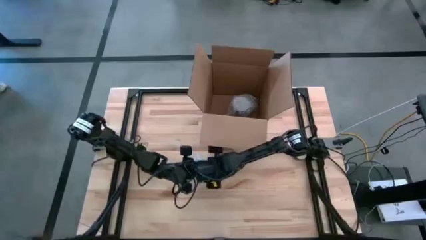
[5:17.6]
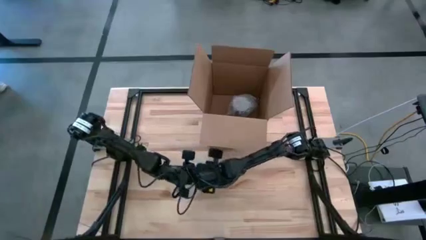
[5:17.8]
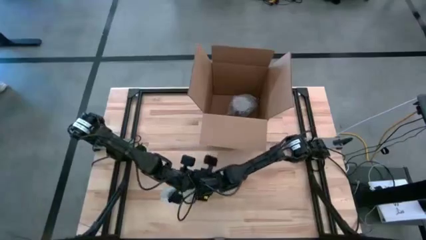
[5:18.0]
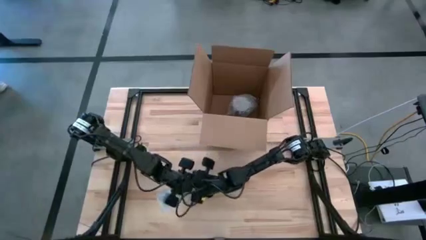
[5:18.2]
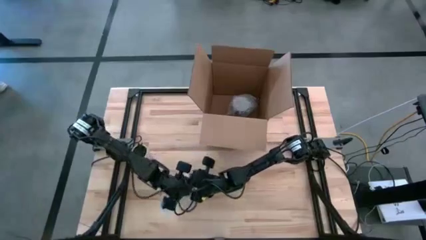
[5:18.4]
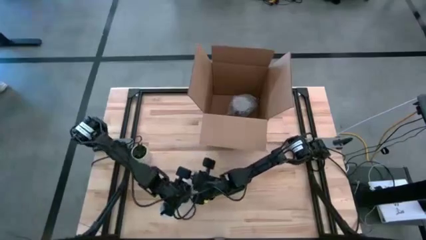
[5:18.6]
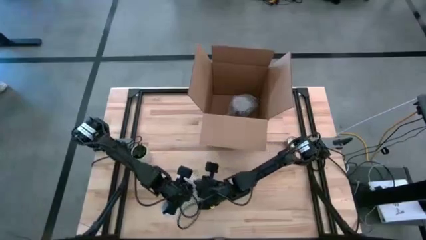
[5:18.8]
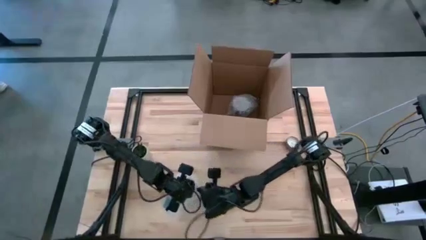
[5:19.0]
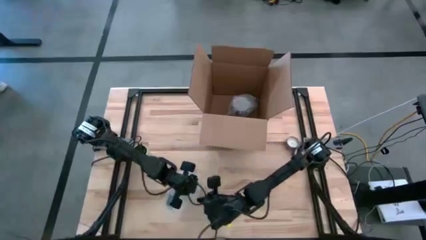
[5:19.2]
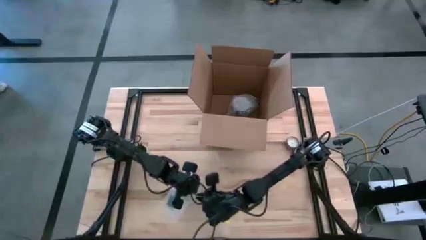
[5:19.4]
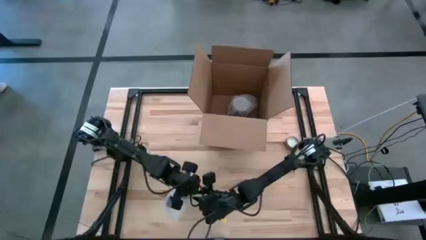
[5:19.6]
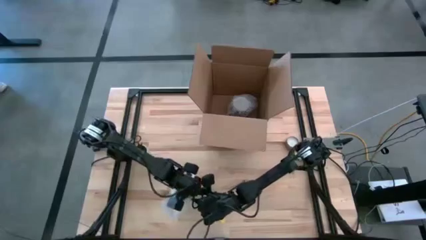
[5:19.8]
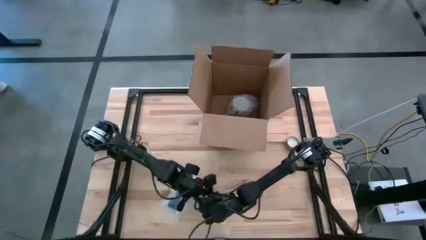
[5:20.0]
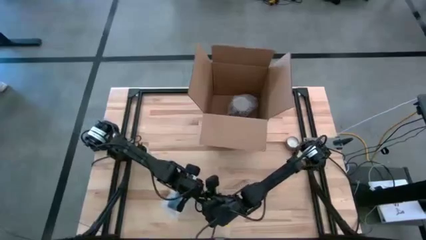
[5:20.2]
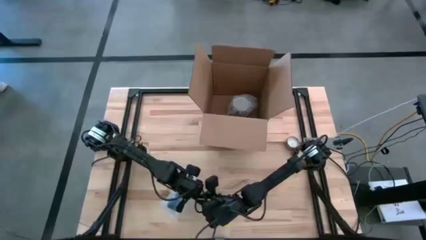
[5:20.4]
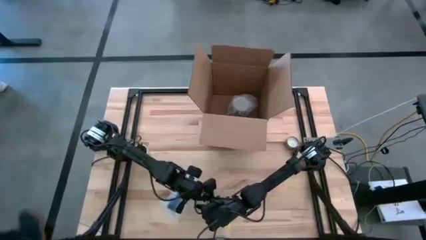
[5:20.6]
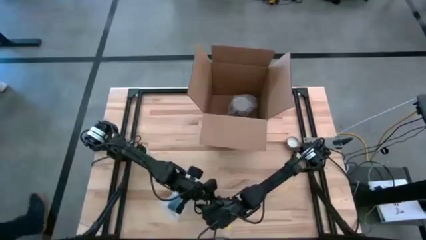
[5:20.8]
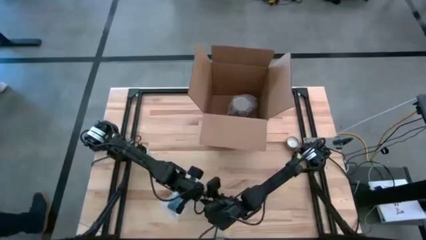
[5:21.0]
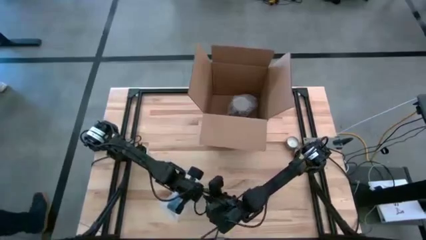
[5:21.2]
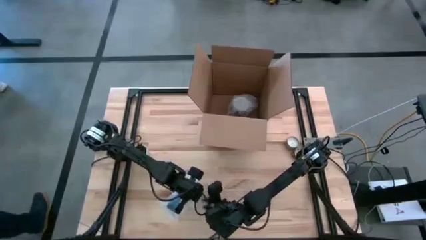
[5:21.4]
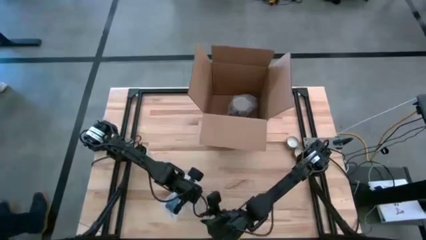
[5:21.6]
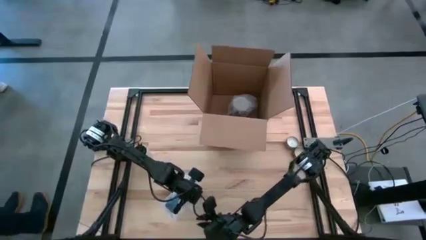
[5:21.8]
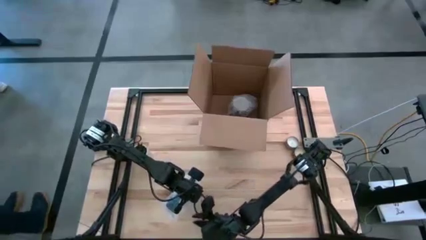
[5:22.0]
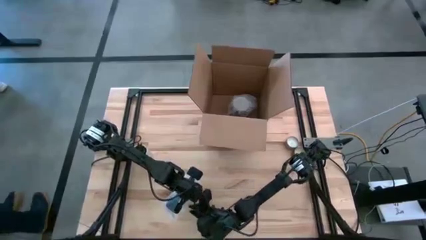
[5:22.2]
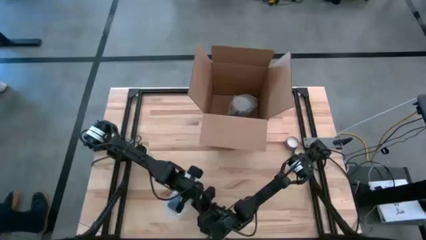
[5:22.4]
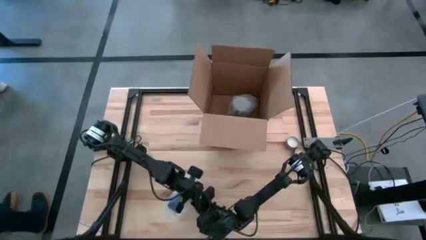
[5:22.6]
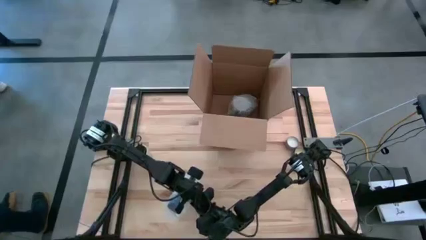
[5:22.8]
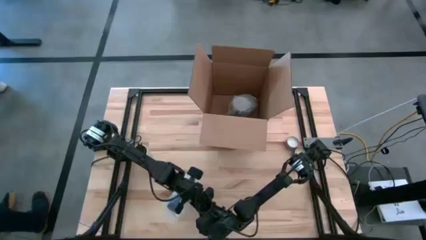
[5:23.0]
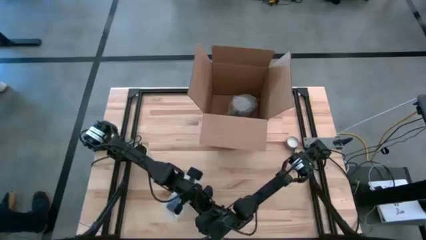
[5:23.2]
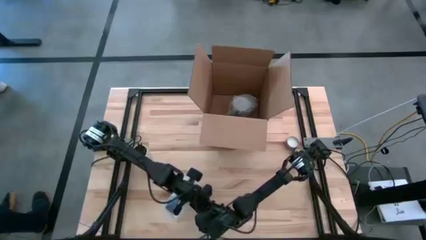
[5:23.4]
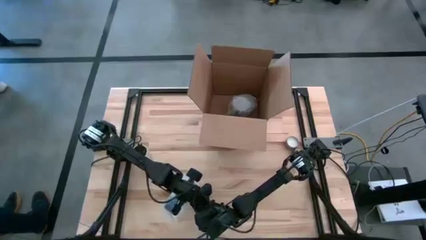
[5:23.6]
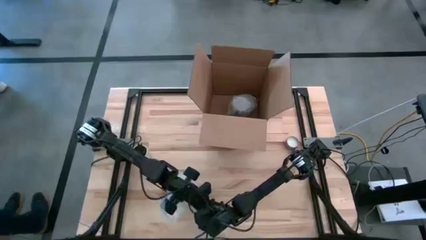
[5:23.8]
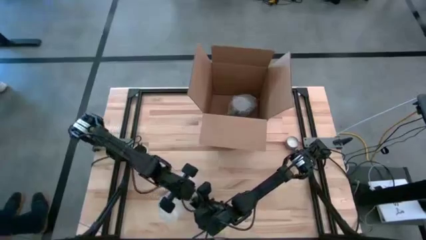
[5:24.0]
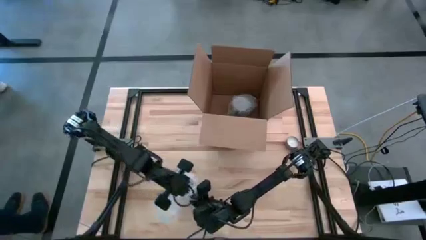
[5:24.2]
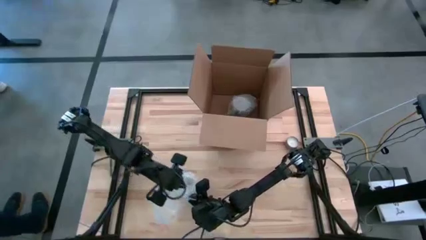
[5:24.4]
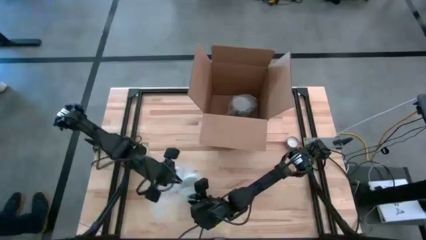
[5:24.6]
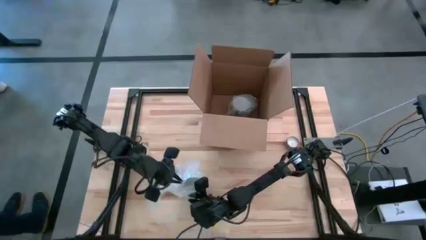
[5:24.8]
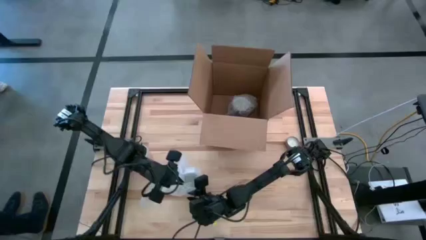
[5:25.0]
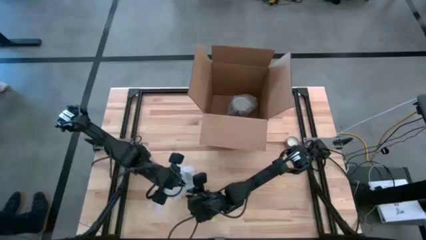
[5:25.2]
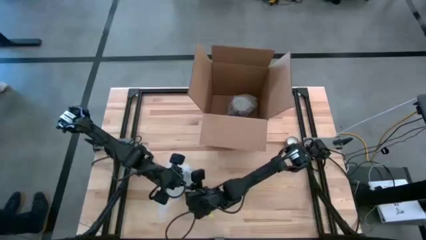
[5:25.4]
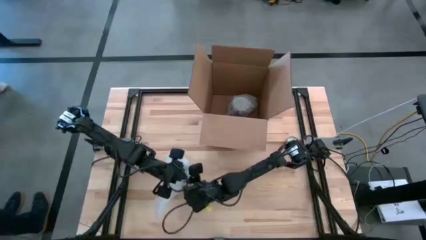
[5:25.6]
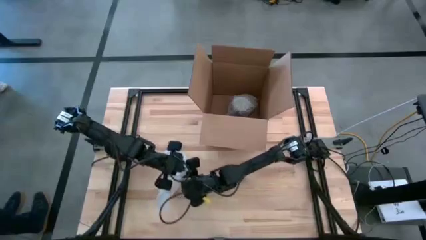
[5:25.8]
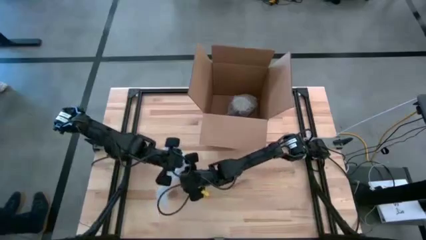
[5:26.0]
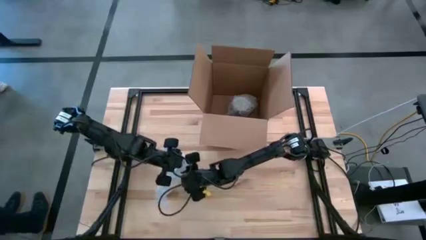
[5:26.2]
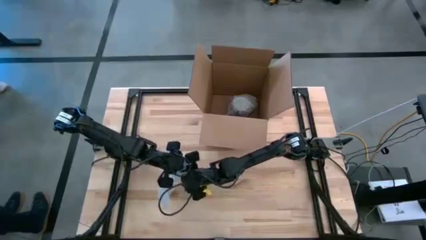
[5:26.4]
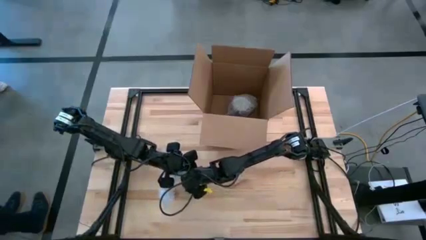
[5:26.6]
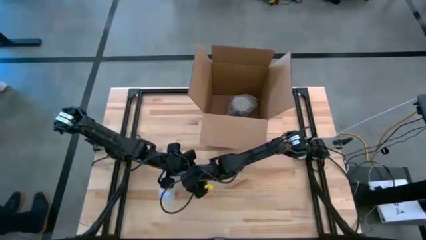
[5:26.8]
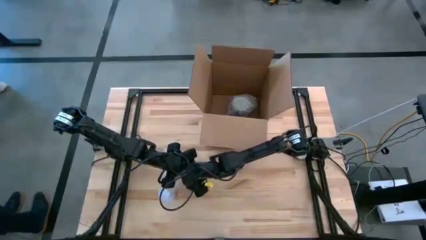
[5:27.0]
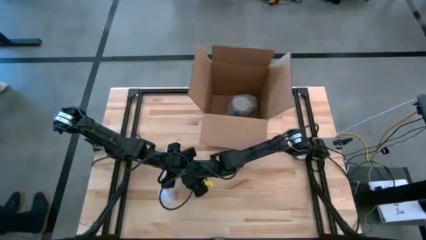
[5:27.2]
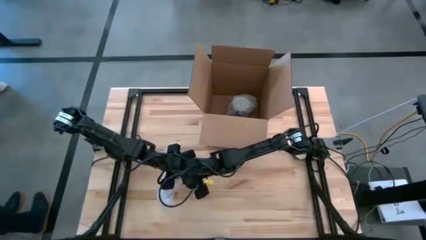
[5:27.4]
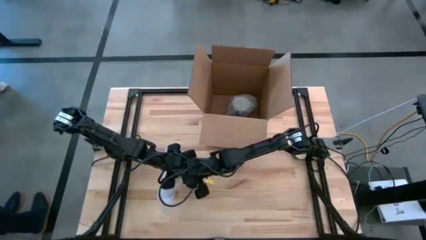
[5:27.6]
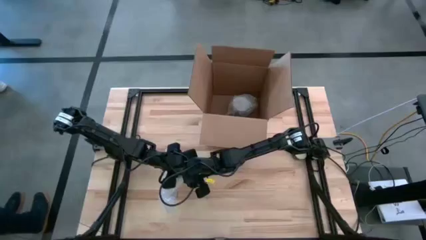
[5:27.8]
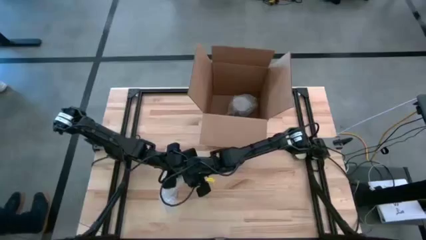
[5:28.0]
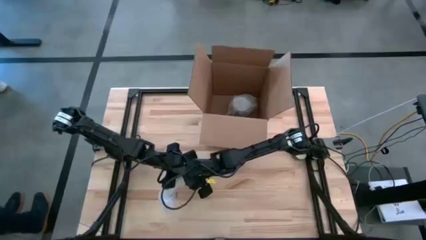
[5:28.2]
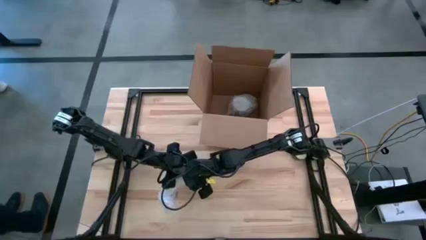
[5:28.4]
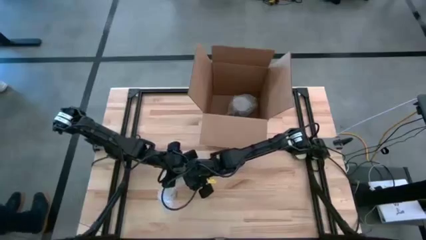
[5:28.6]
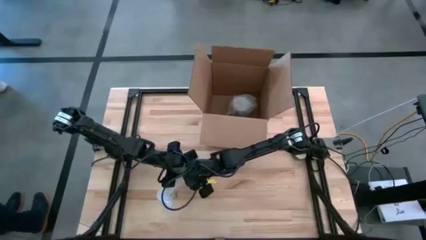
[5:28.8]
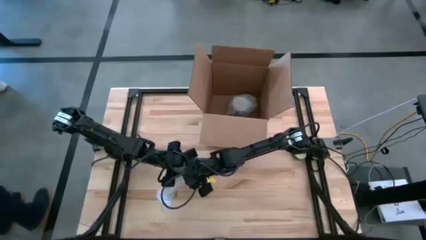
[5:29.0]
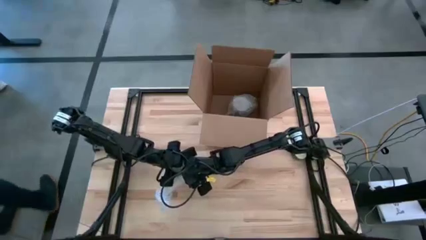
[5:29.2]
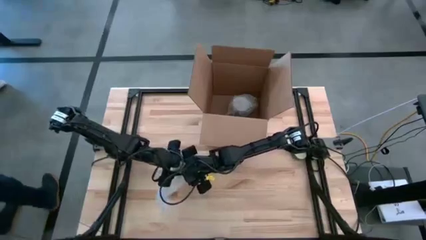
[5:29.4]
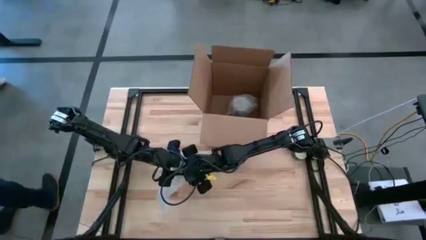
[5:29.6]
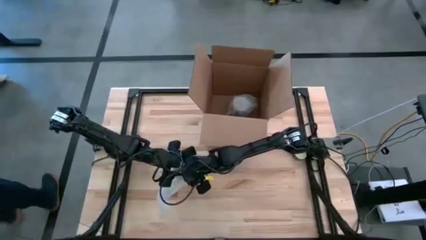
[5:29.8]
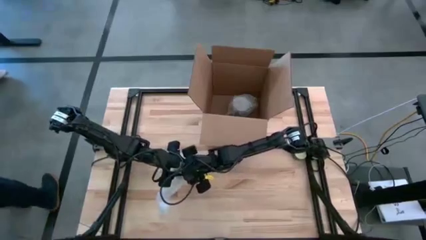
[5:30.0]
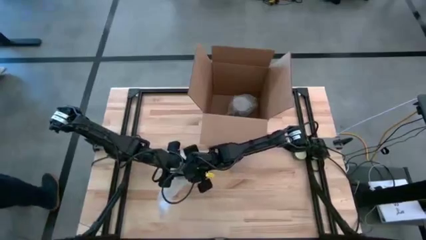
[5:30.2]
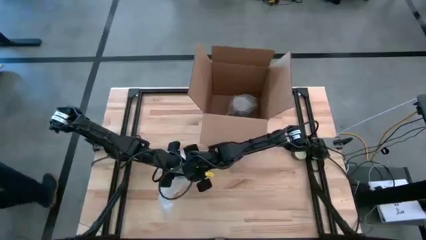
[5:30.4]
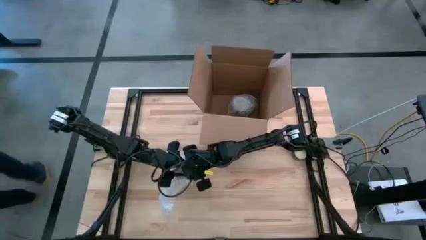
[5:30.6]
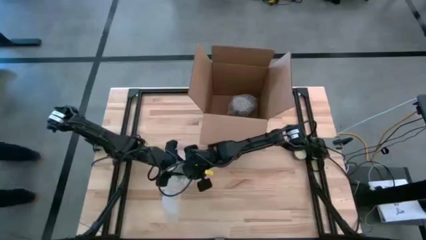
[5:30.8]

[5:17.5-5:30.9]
Task: wrap mug
Wrap the blue patterned mug with the bubble wrap

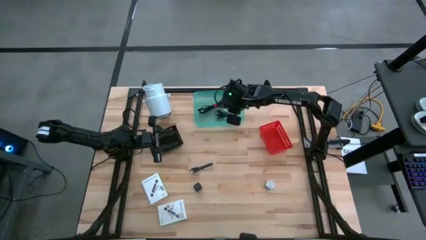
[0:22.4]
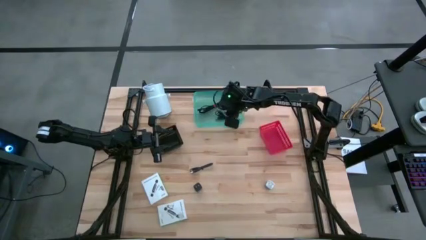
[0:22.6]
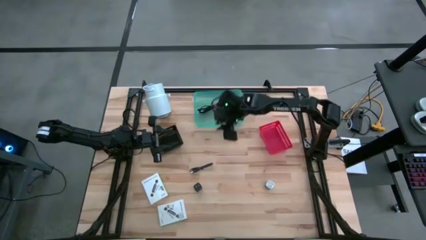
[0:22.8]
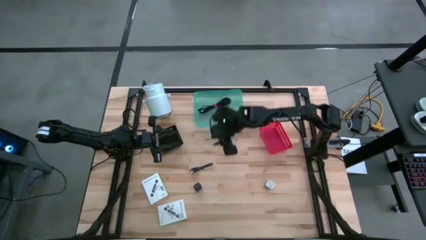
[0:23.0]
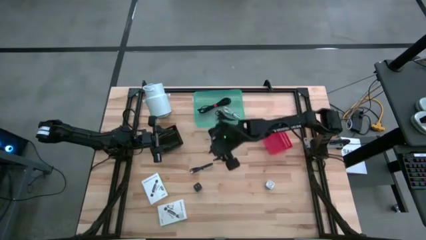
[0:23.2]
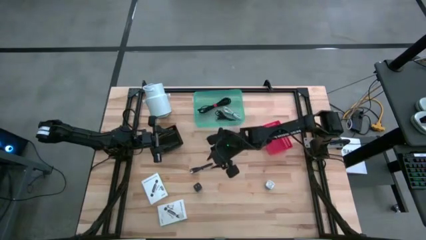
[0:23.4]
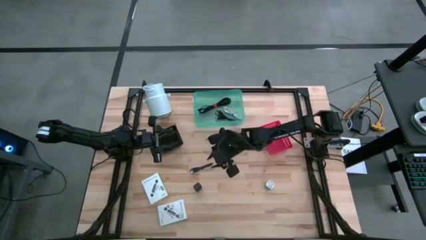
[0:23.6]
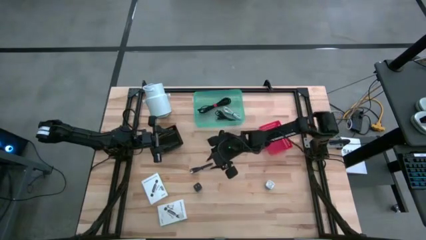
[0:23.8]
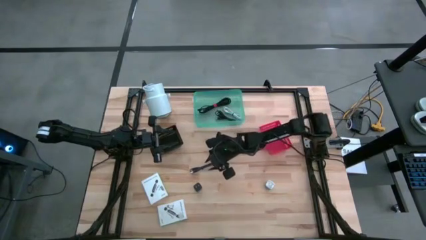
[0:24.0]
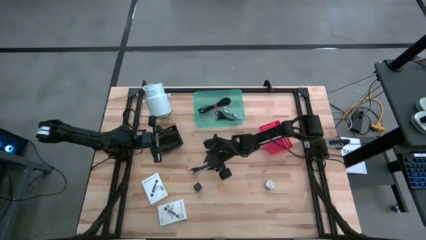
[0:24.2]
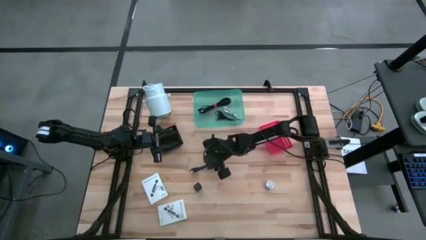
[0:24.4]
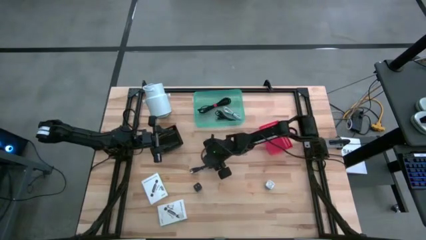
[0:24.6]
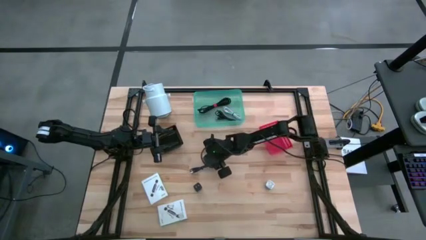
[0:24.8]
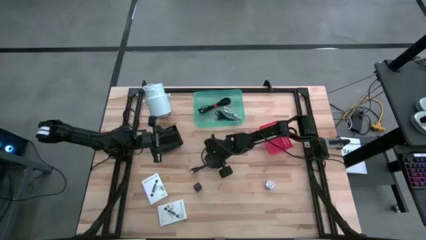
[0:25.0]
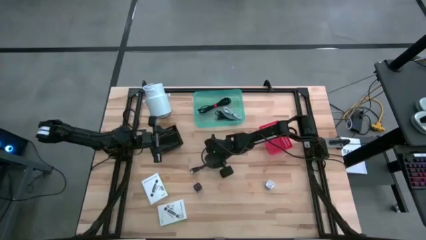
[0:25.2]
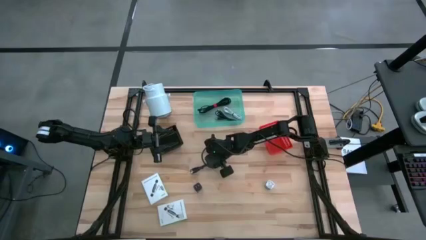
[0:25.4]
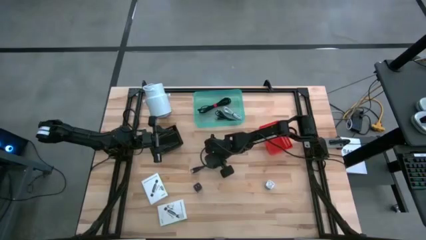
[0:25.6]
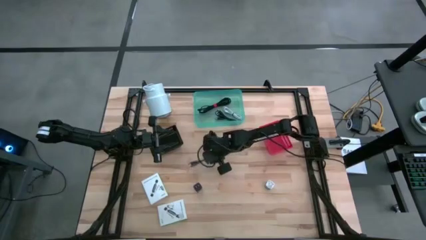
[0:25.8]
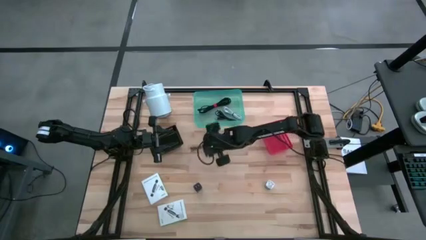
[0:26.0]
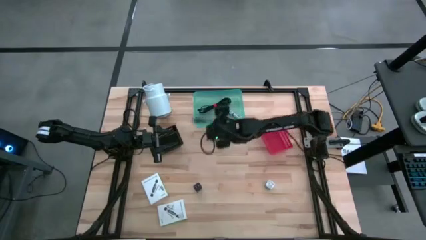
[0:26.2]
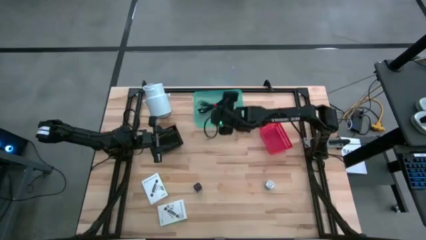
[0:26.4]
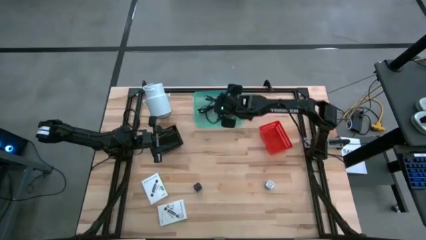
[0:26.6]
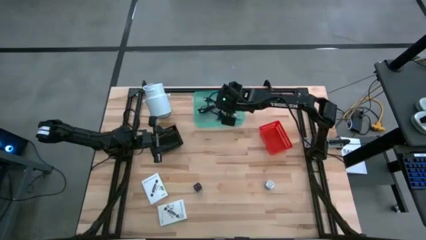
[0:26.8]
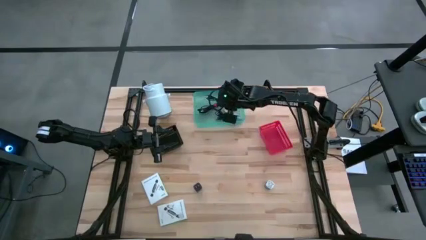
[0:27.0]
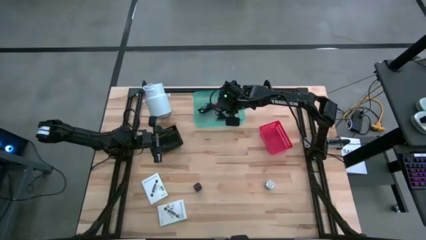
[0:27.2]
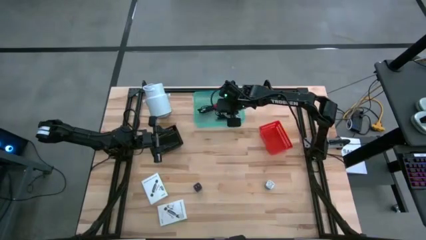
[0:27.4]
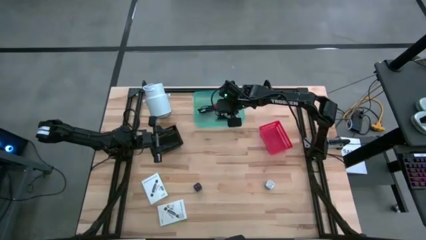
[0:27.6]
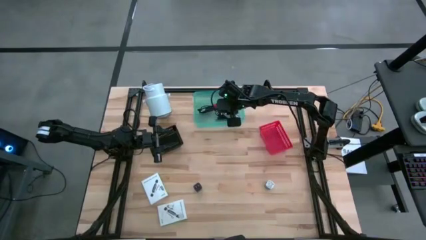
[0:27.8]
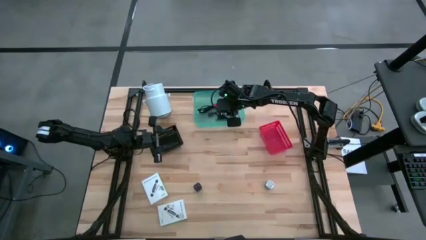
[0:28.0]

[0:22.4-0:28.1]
Task: Pick and place items into bin
Put the black charger cable into the blue bin
